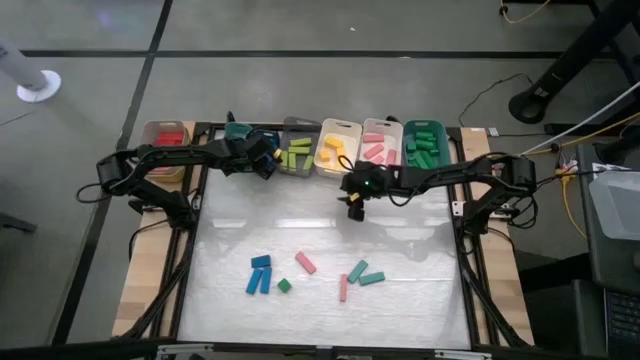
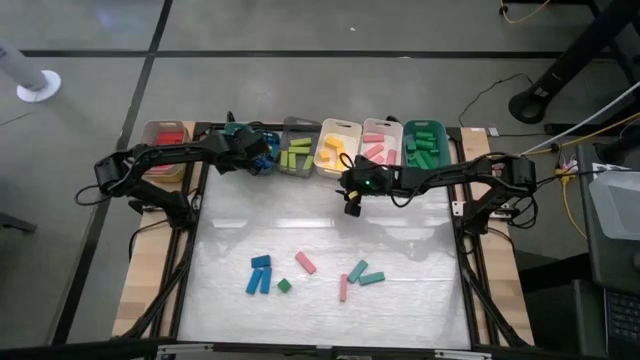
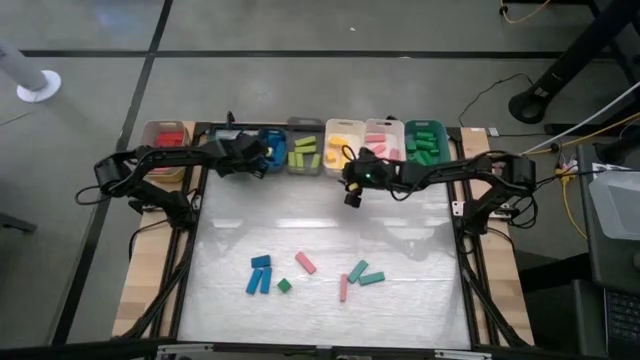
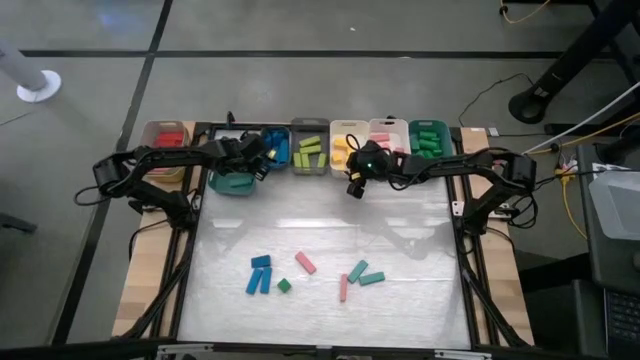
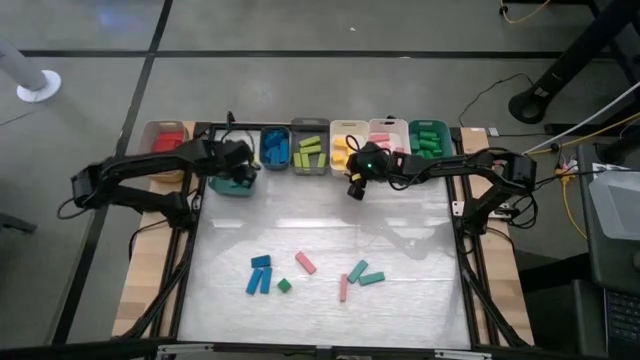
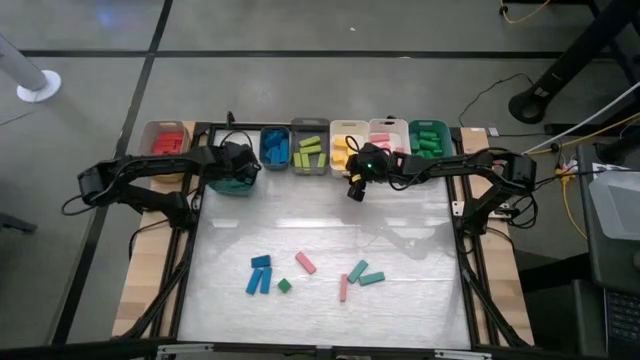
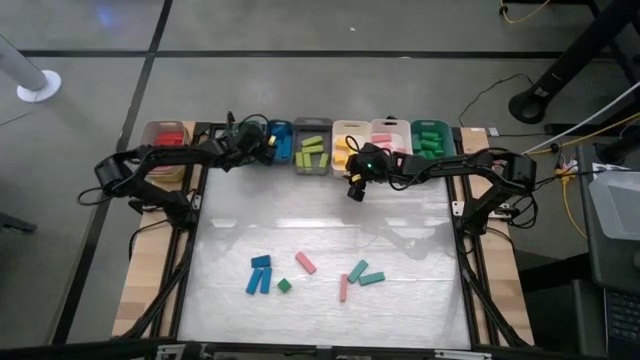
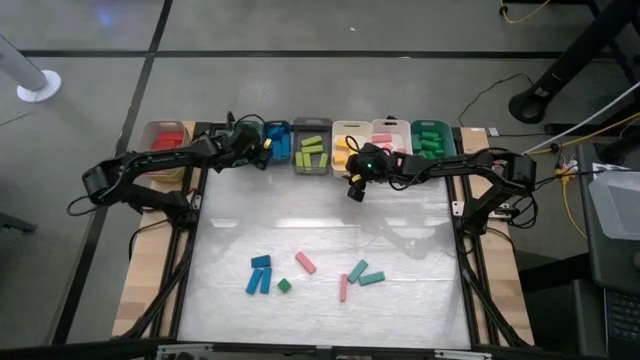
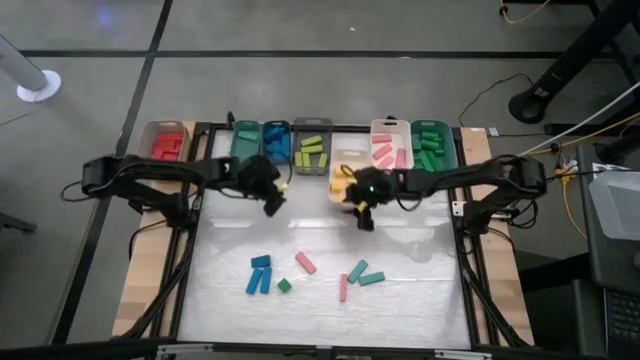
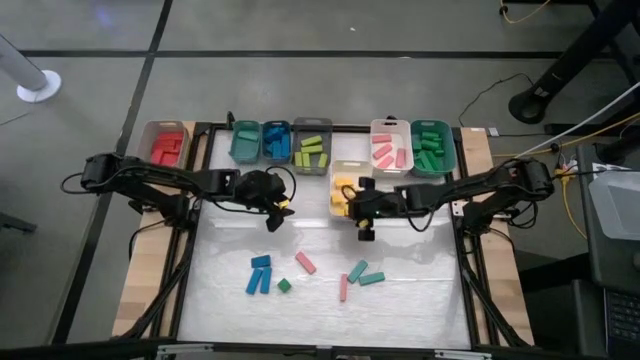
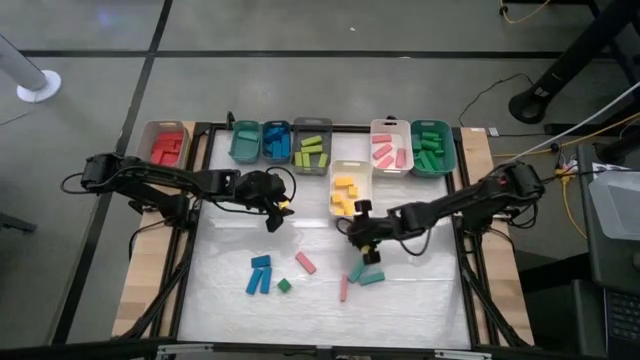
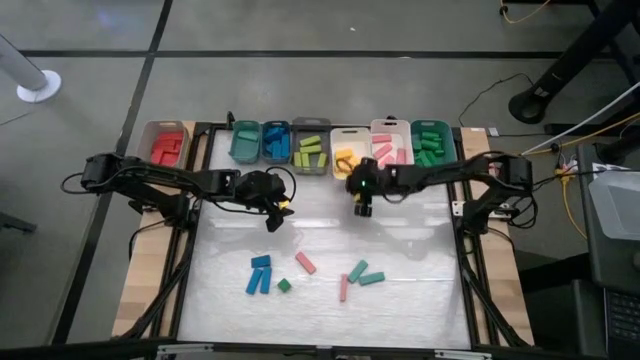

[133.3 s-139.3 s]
Task: Sort blocks
Adjust the bins

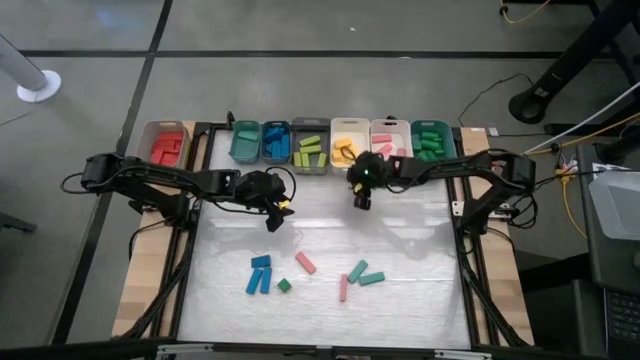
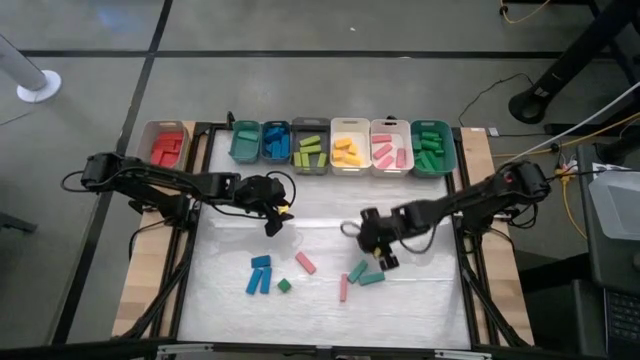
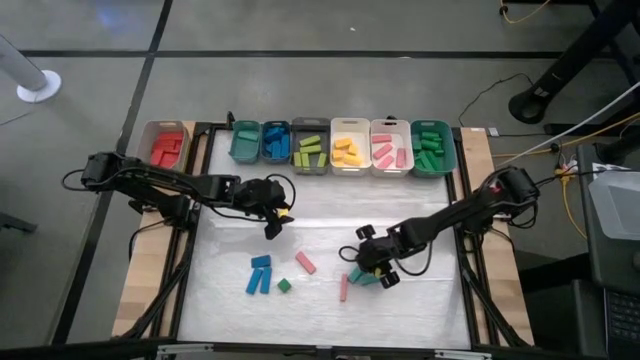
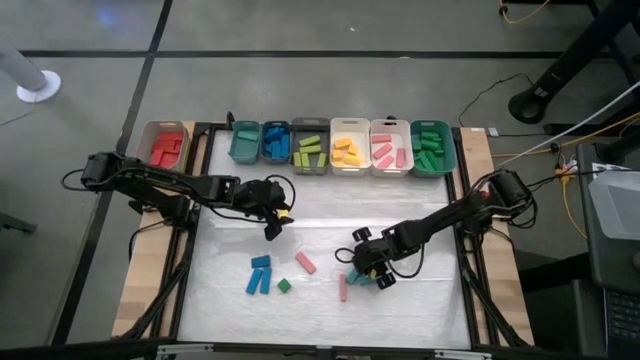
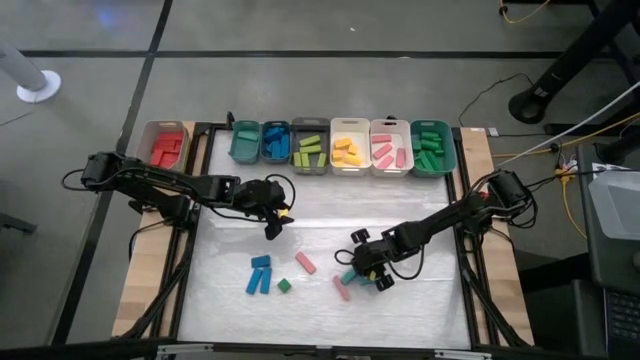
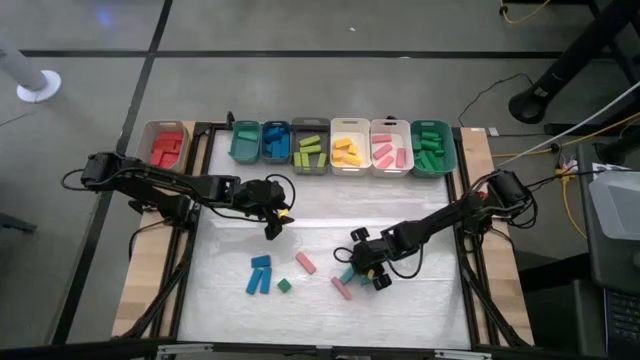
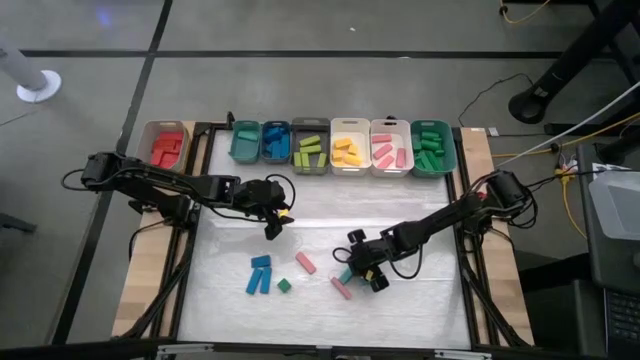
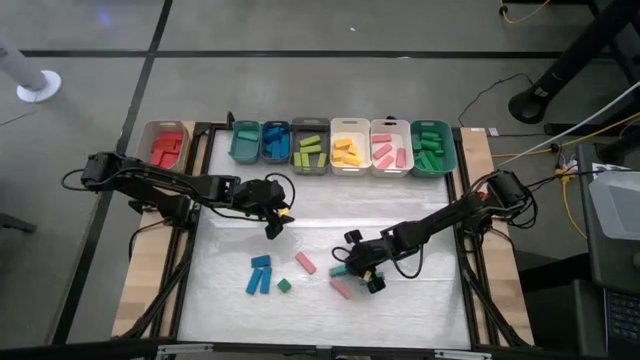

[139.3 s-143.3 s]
Put the light blue block into the left green bin

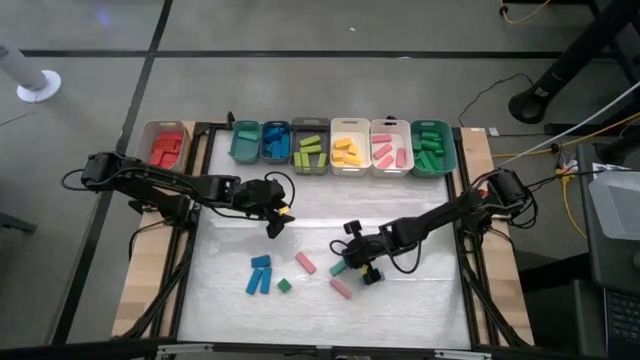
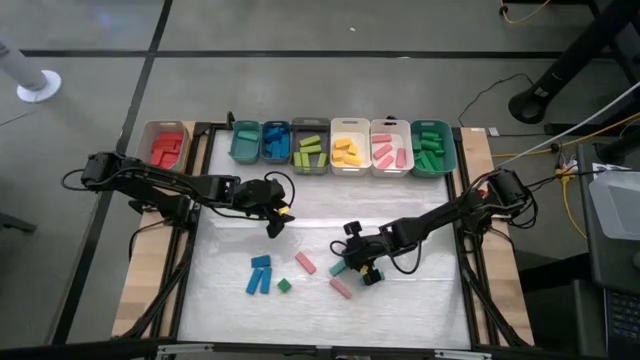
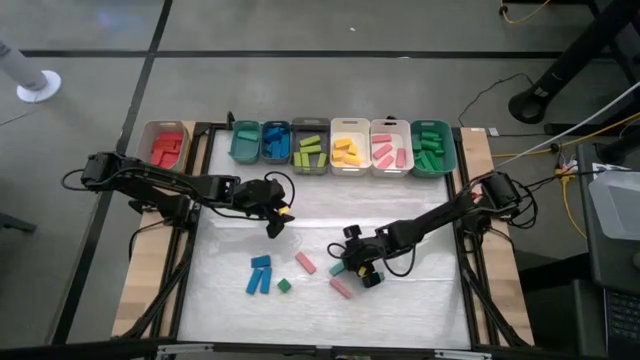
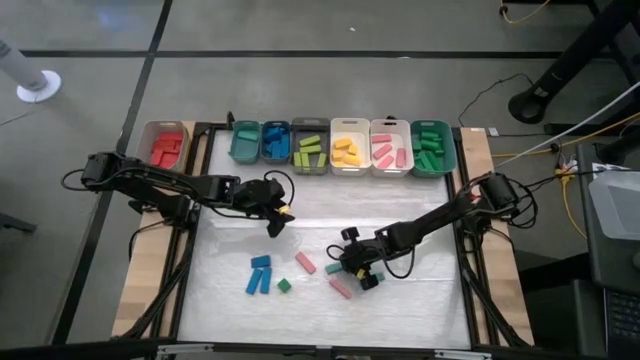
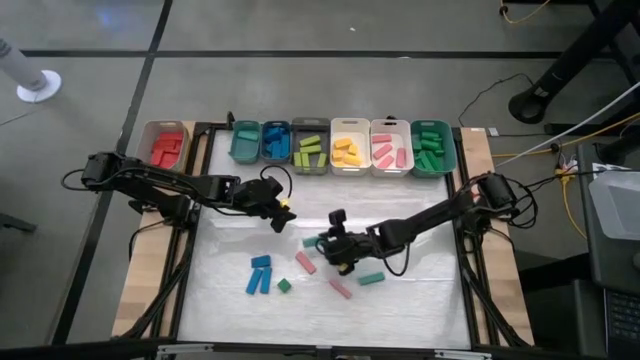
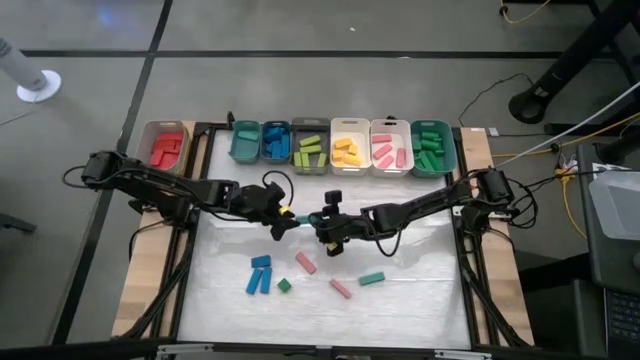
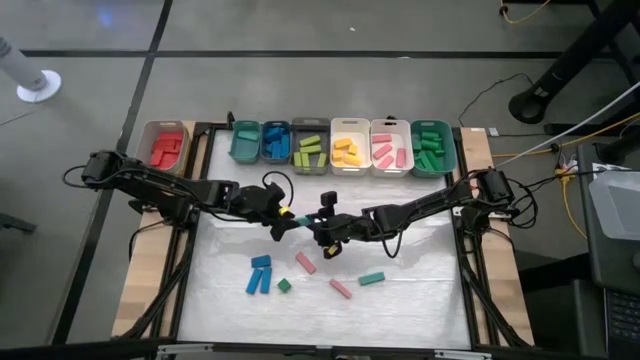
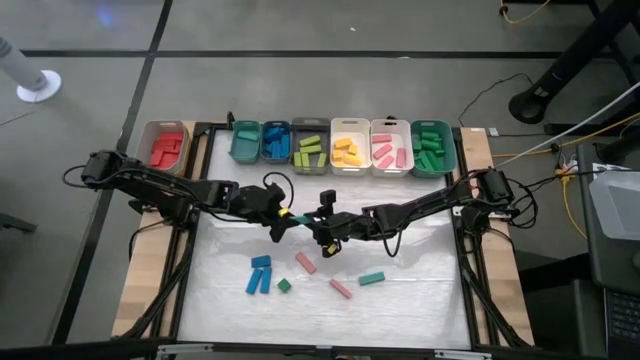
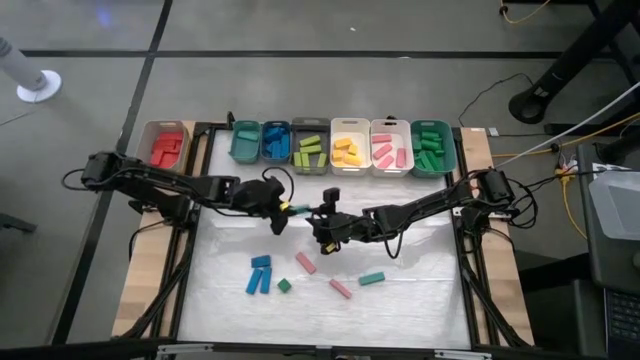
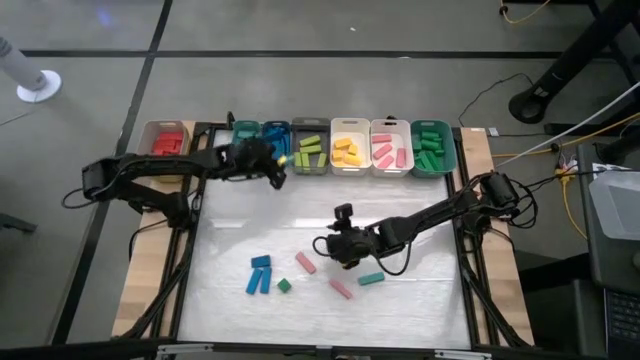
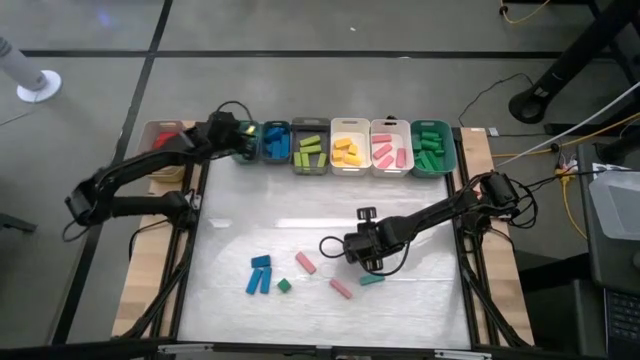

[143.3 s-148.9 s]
Put the light blue block into the left green bin

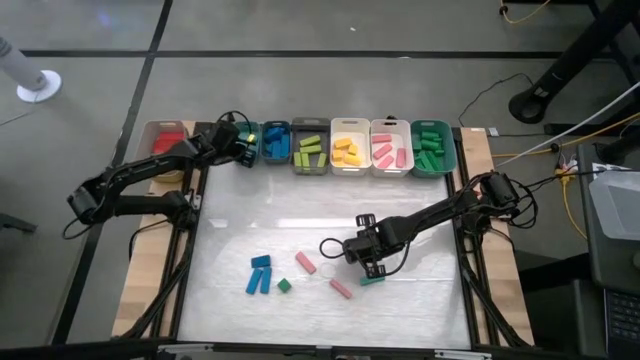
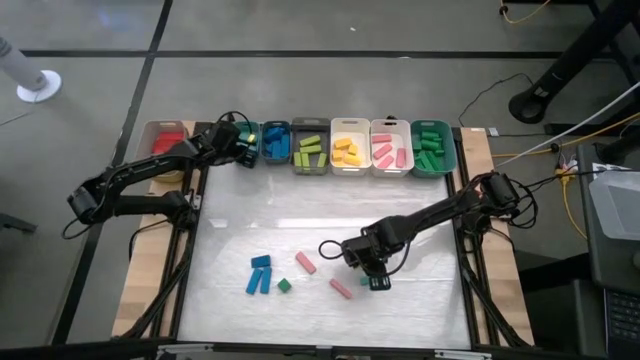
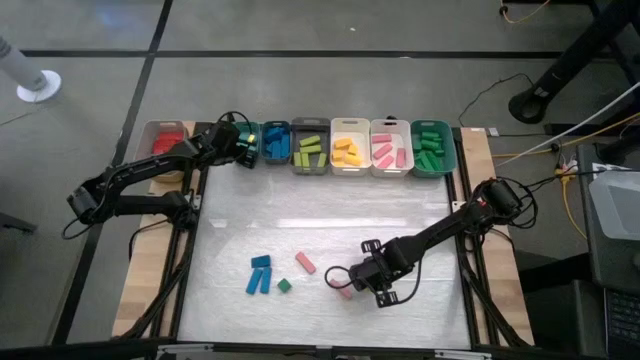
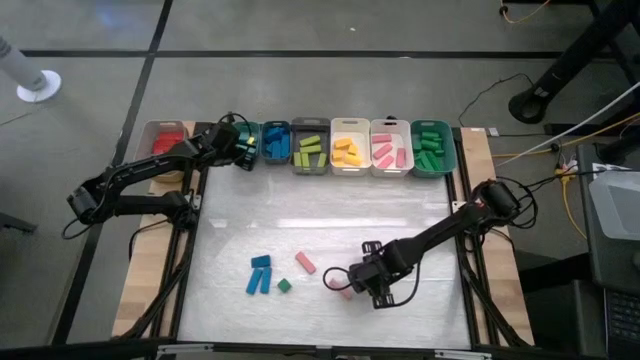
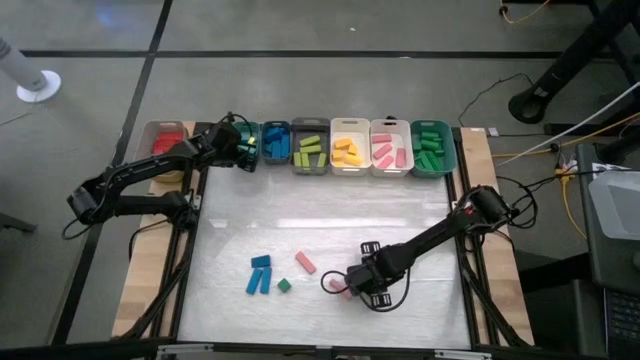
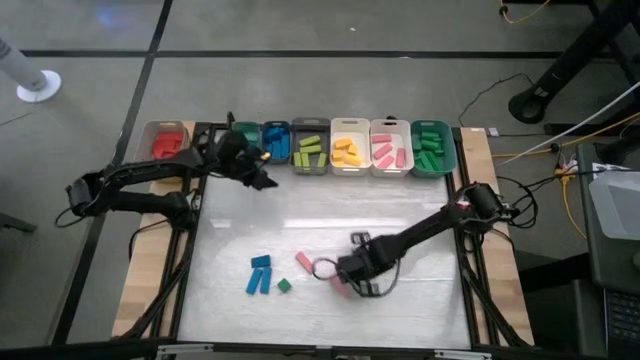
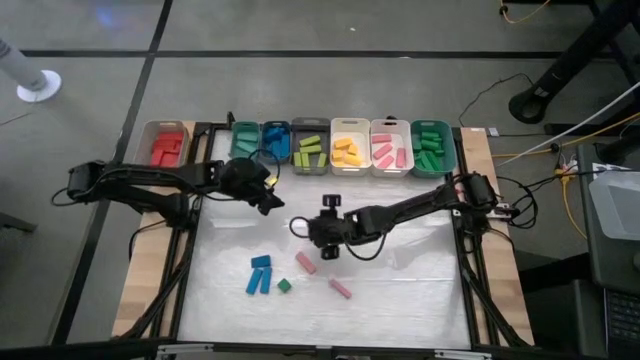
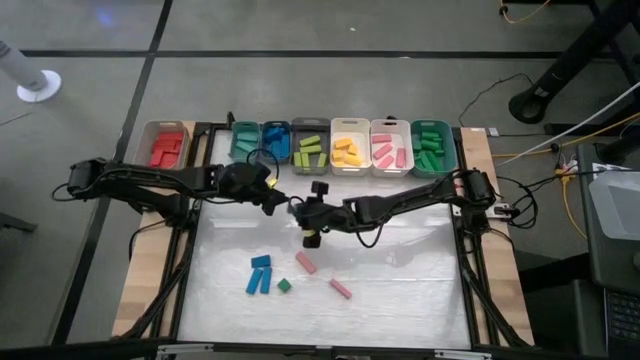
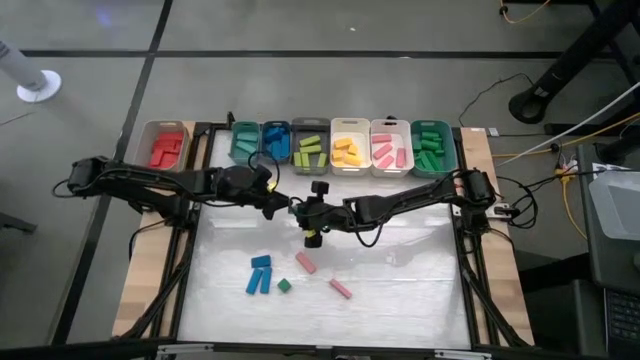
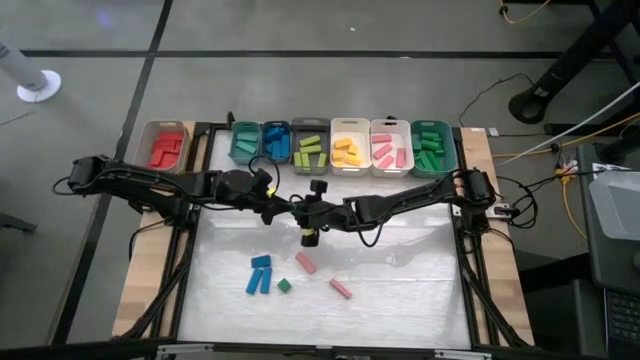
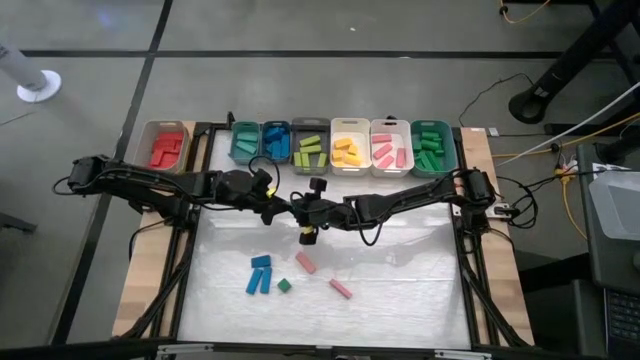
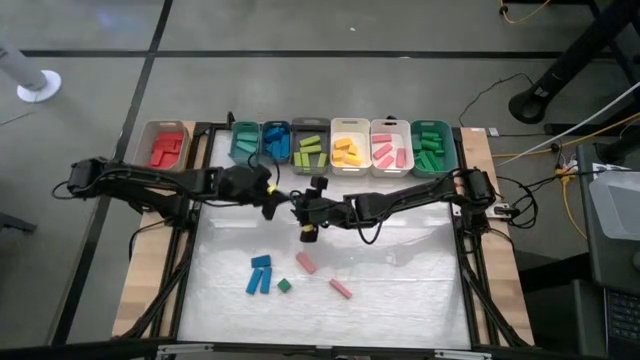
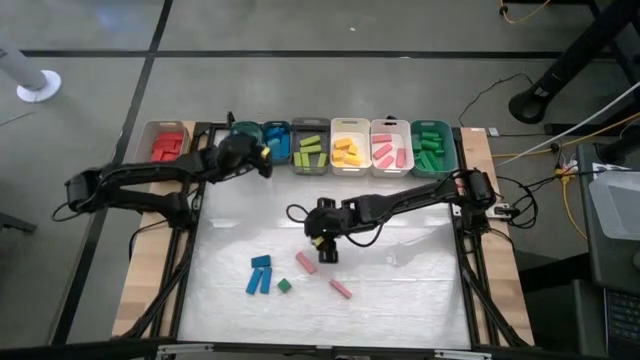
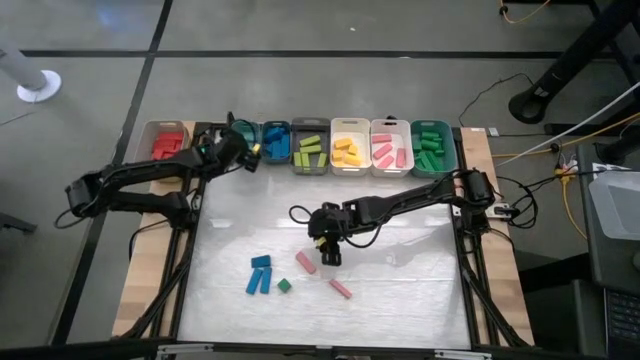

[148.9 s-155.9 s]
Put the light blue block into the left green bin
